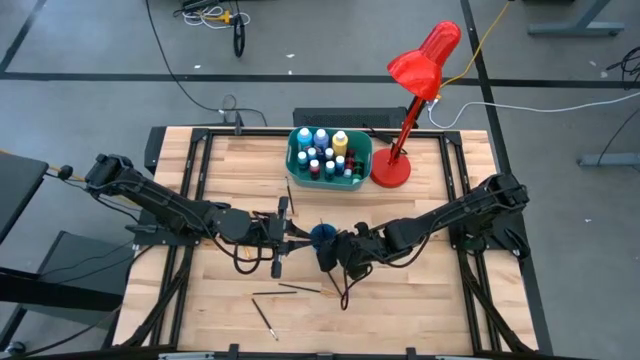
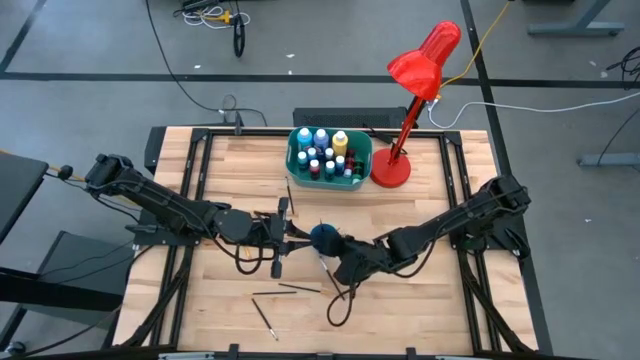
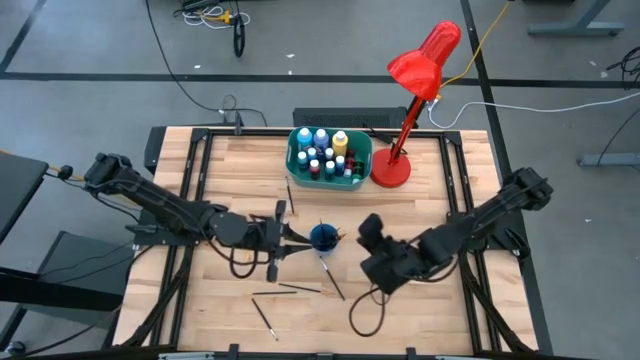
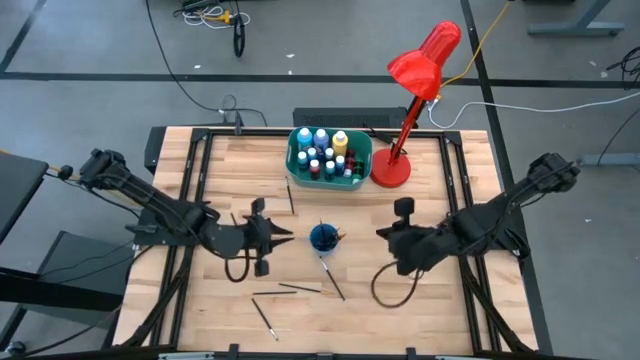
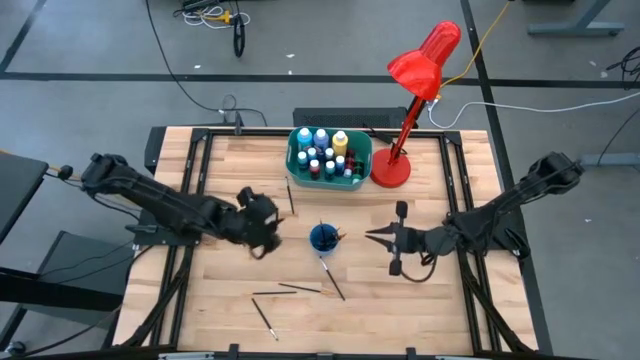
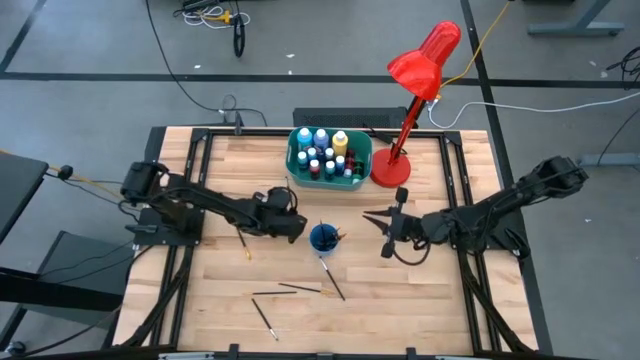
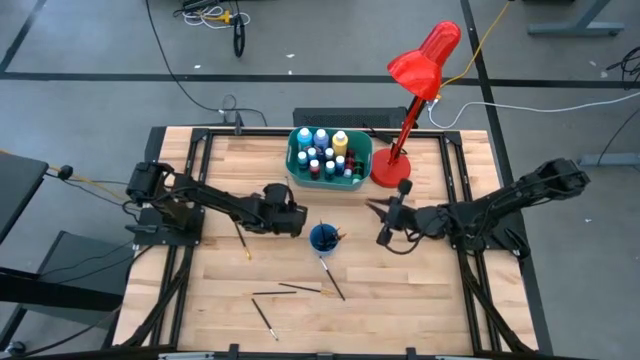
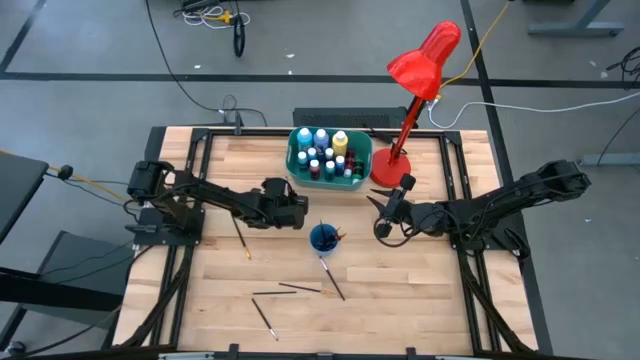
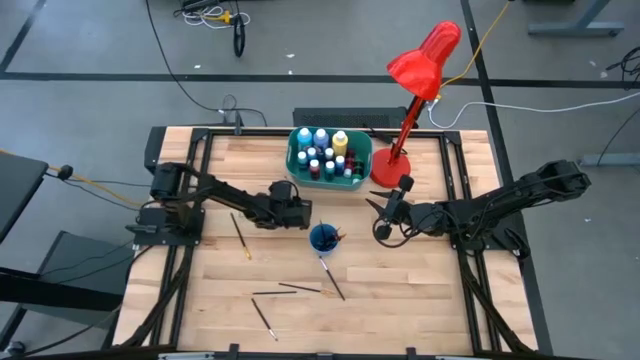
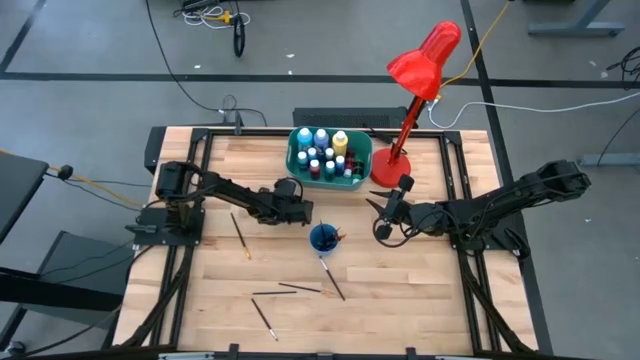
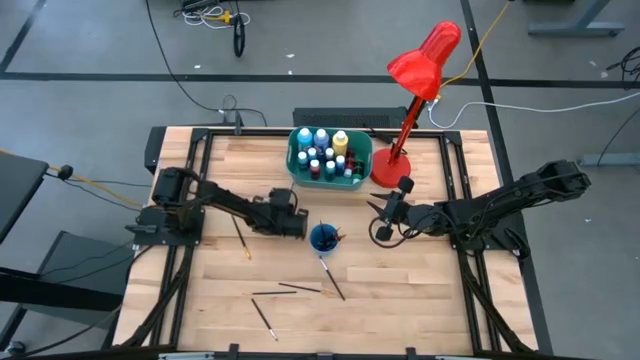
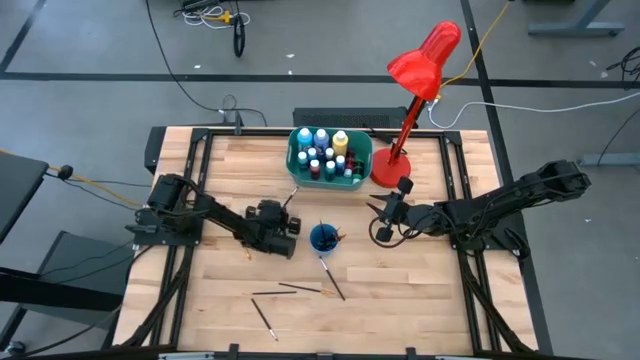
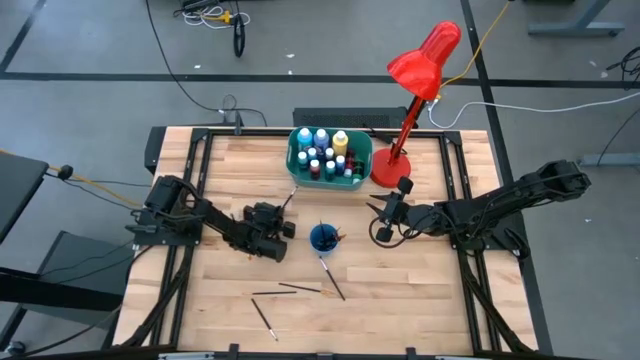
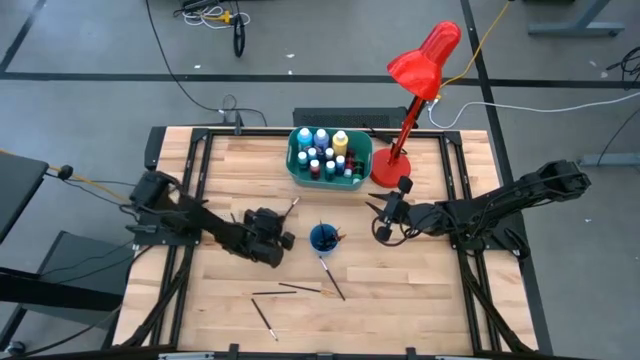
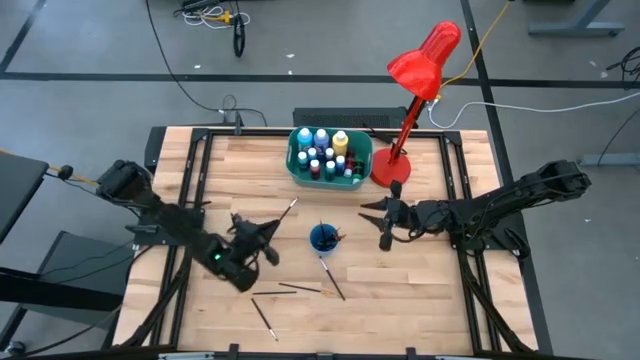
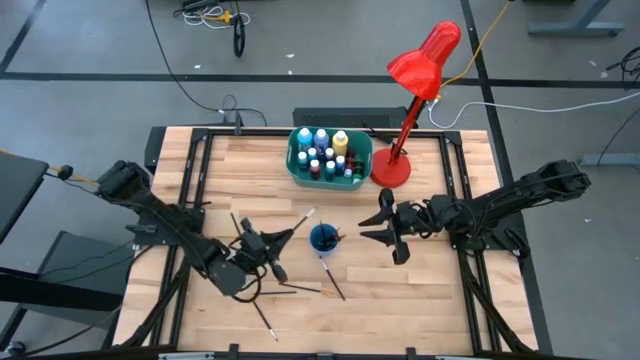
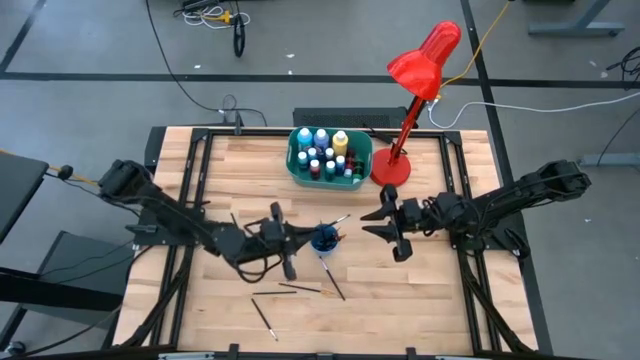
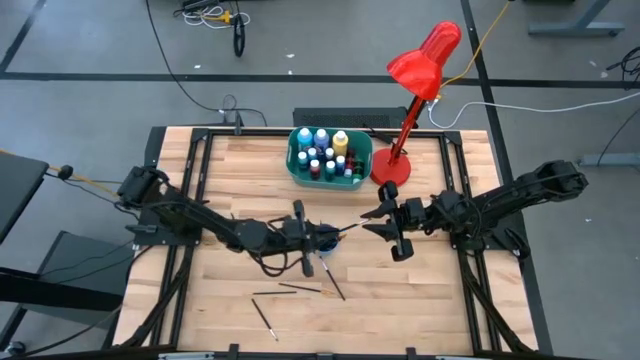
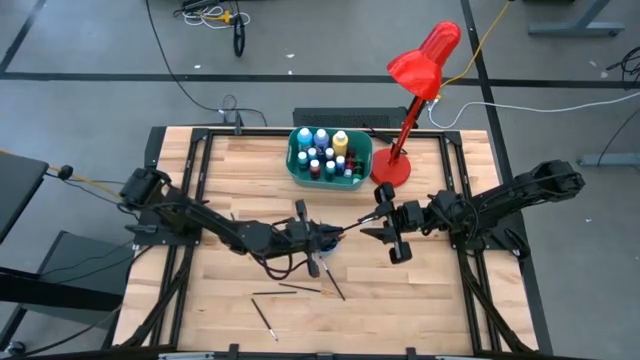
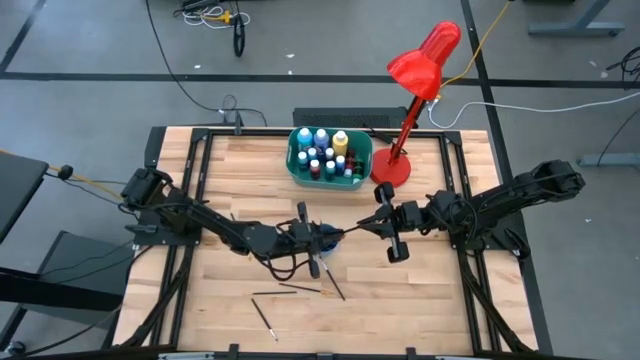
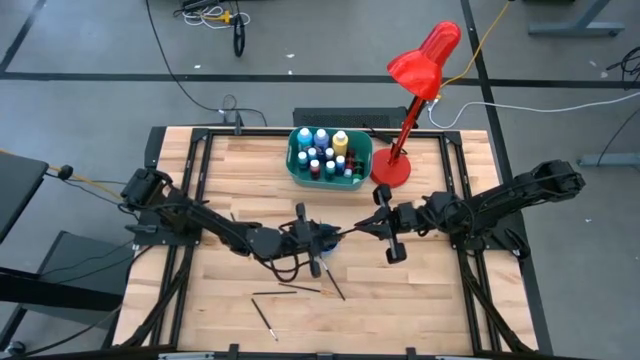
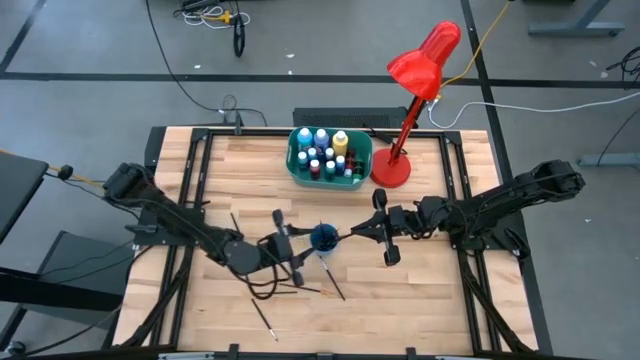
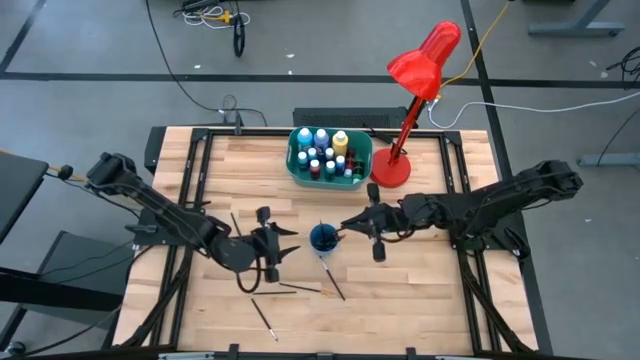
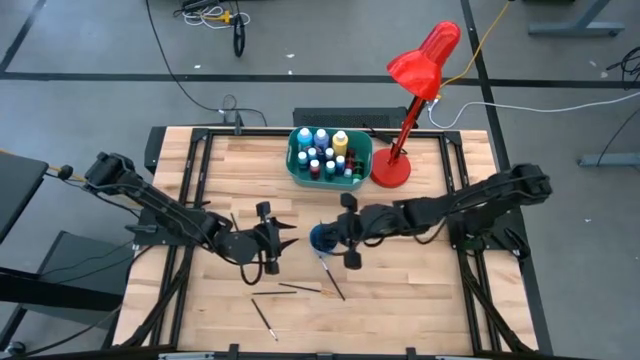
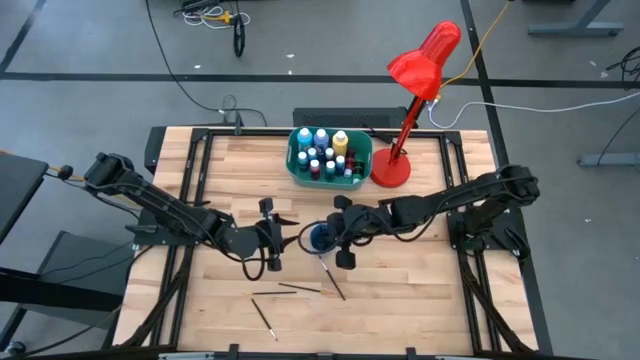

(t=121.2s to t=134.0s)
Task: Pick & Place Paint Supplies
Put the silver paint brush into the blue cup

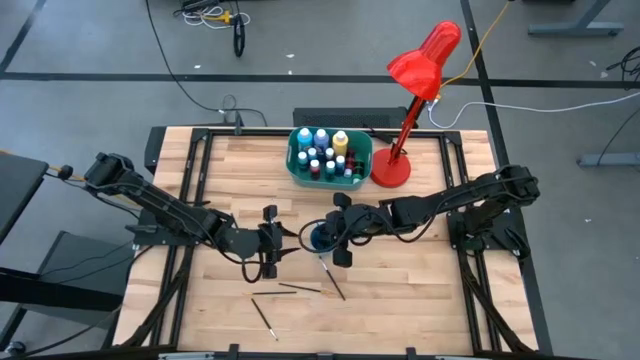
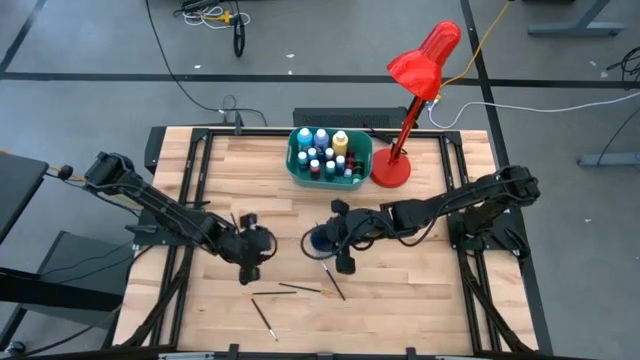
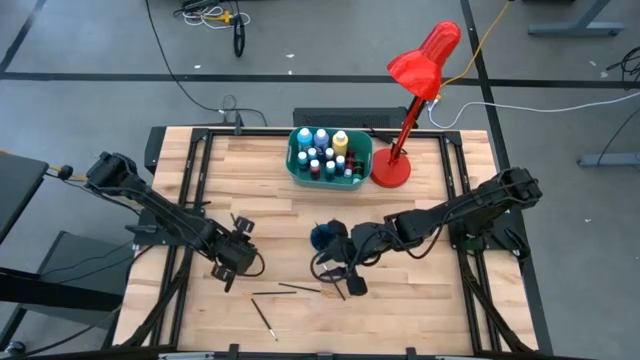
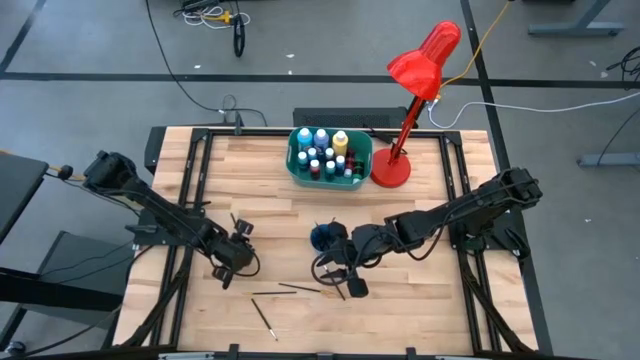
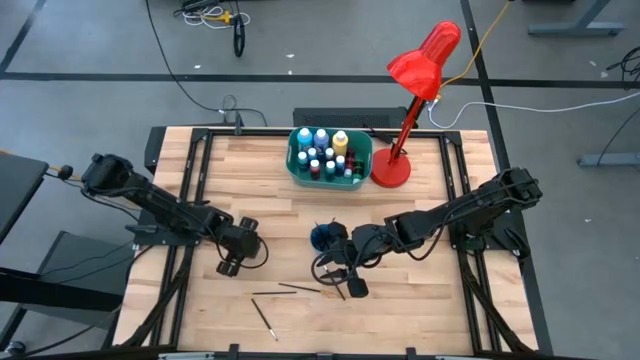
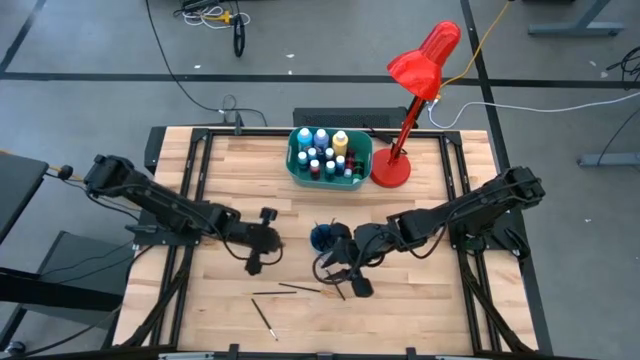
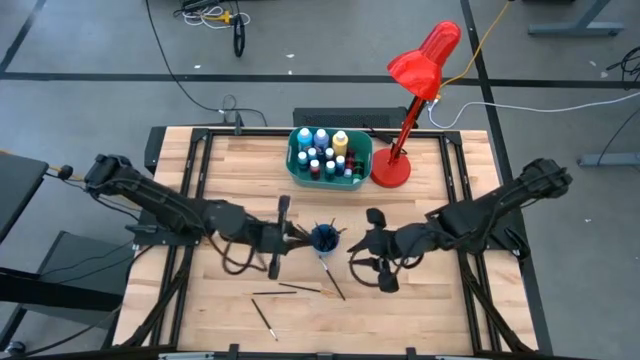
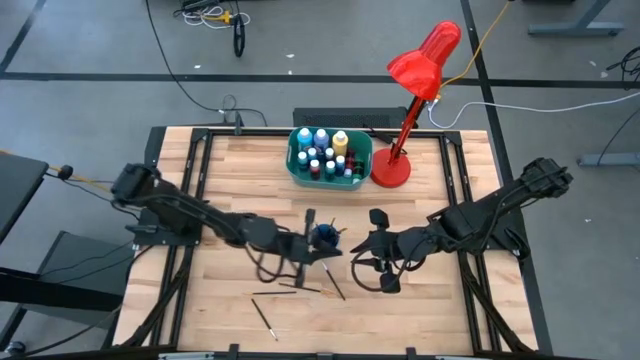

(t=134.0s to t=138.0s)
Put the gold paint brush into the blue cup

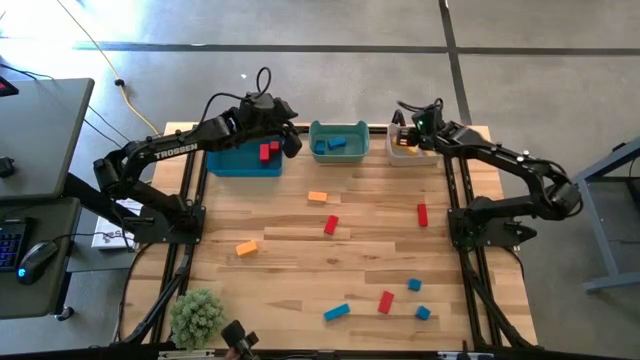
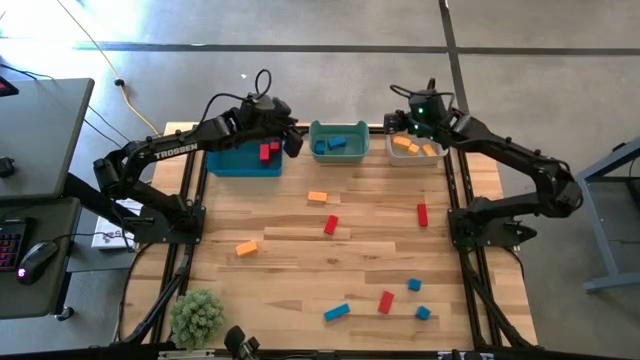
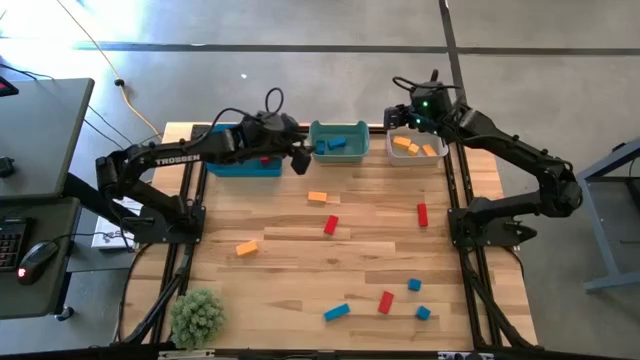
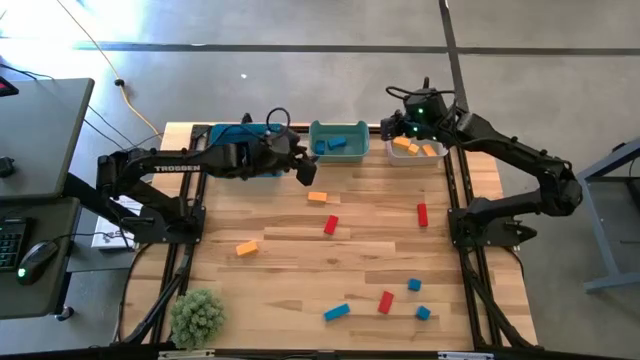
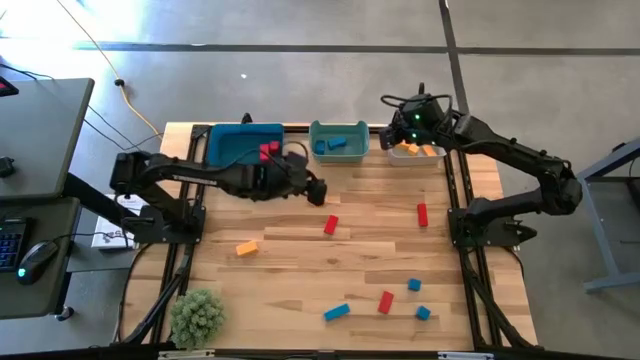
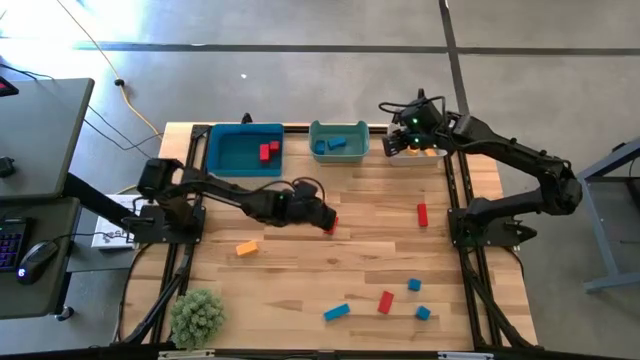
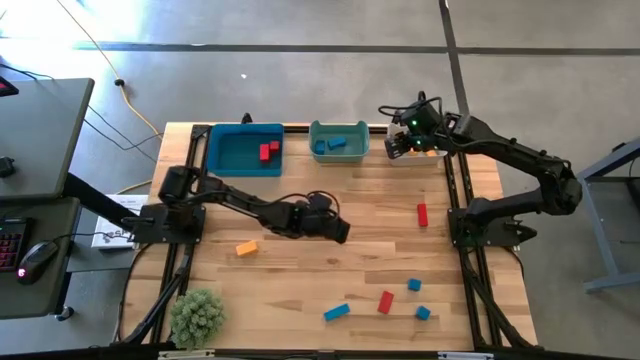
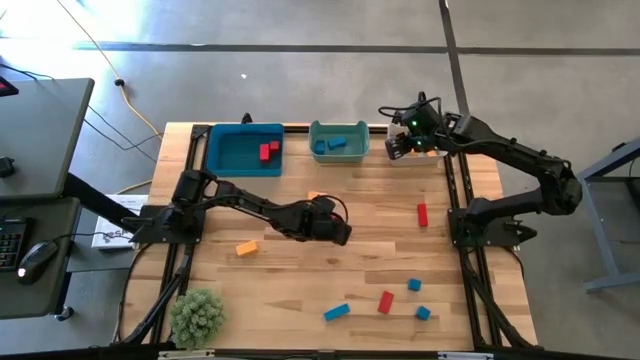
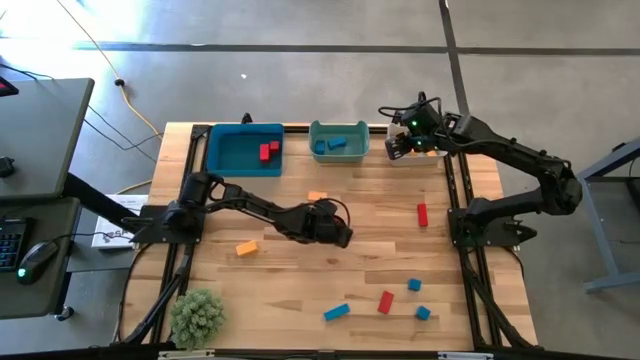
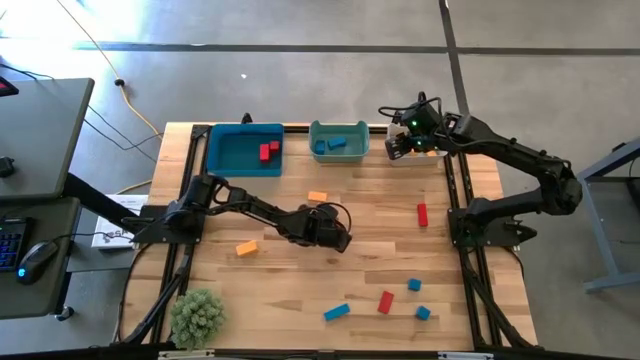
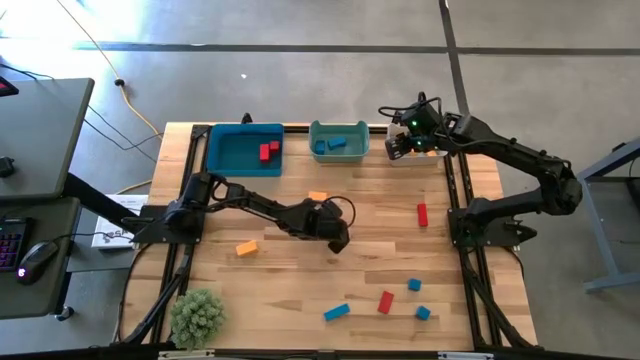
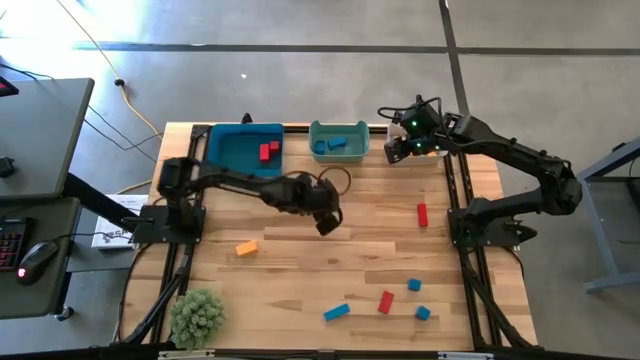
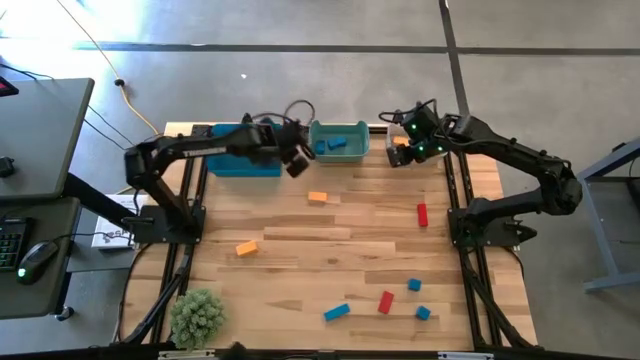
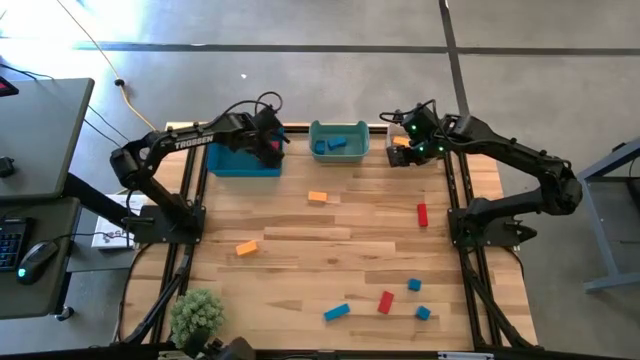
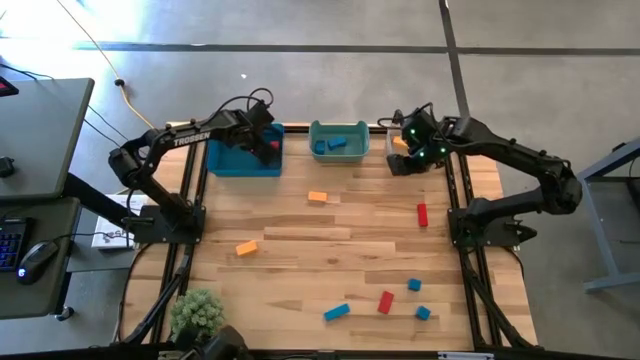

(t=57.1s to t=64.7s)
Task: Sort & place blocks by color
Put the red block into the blue bin
